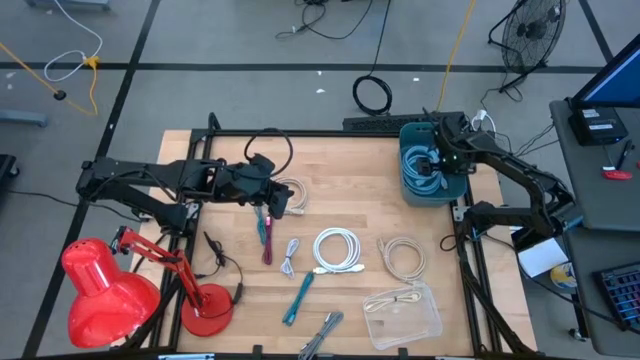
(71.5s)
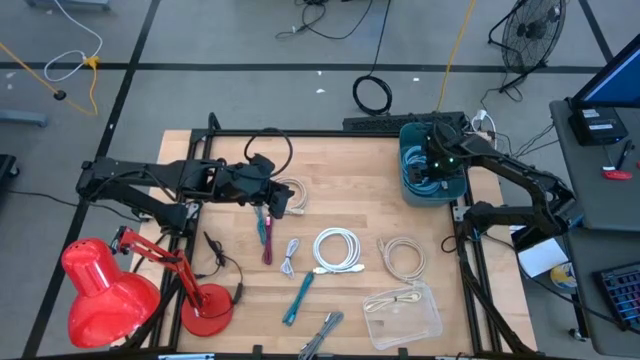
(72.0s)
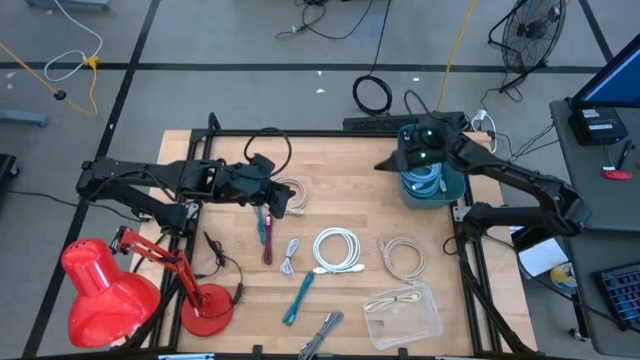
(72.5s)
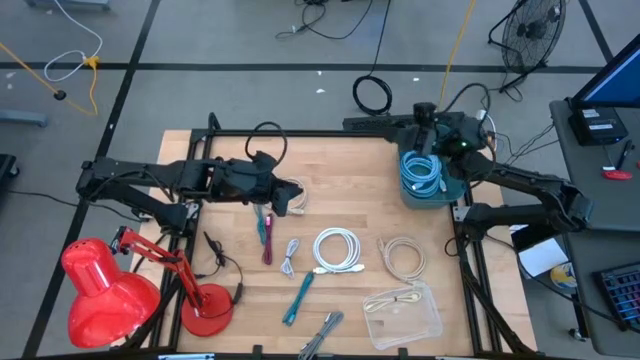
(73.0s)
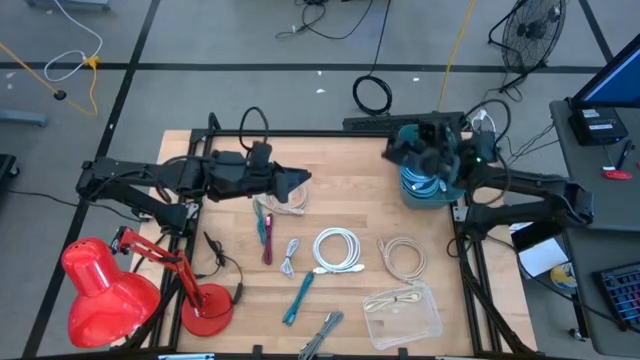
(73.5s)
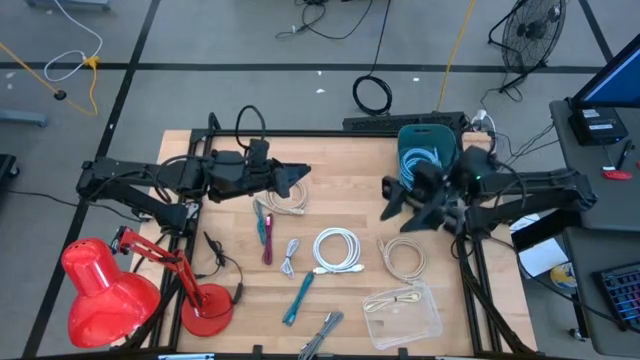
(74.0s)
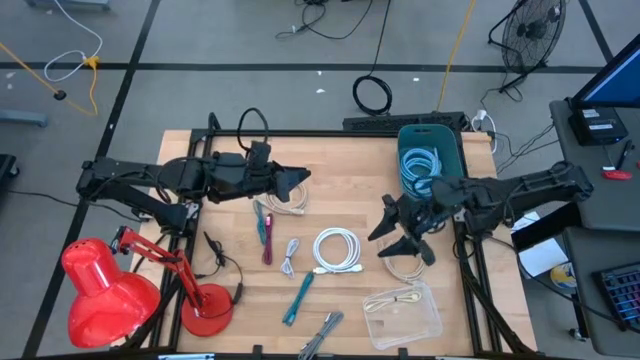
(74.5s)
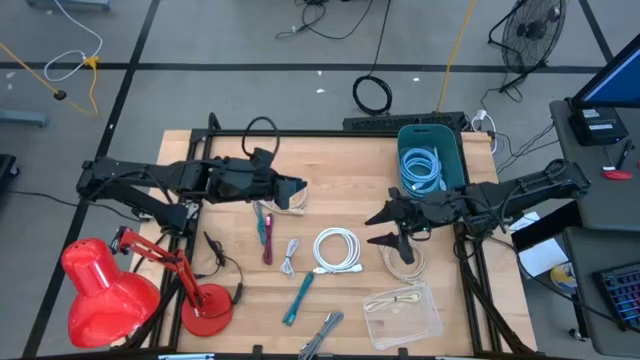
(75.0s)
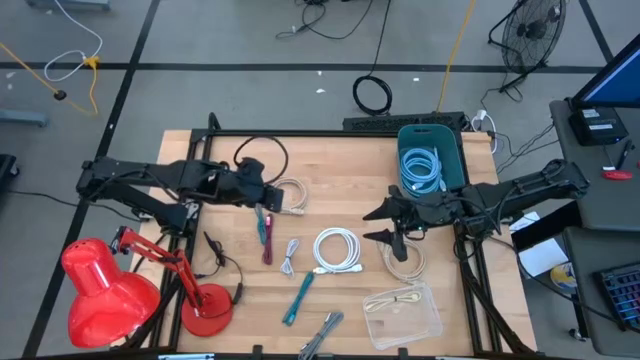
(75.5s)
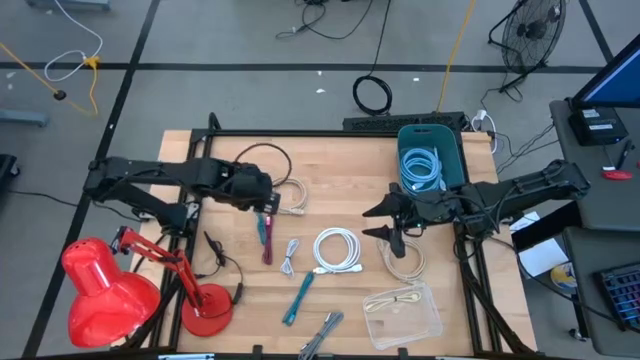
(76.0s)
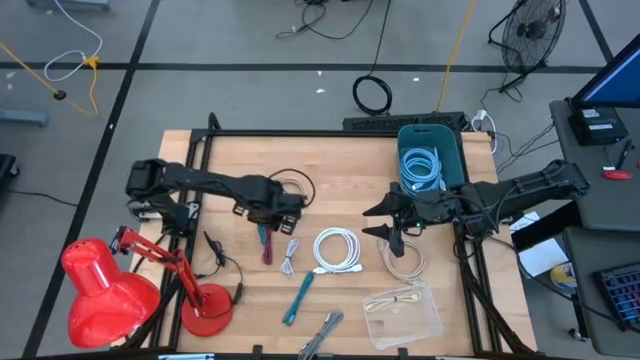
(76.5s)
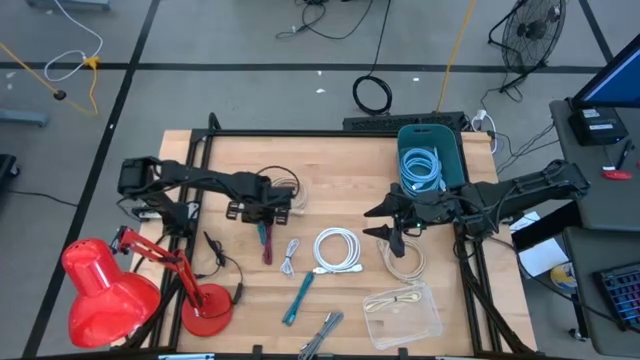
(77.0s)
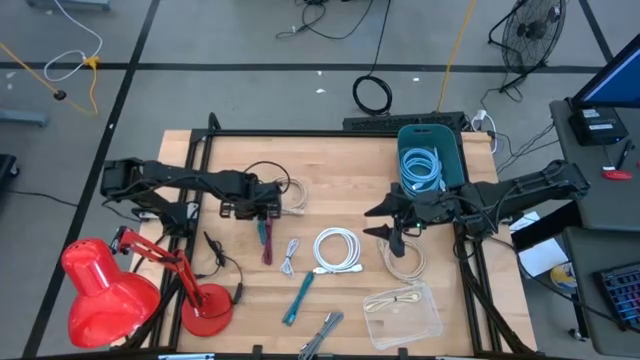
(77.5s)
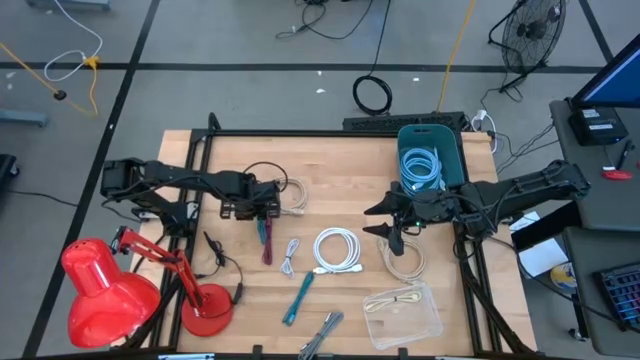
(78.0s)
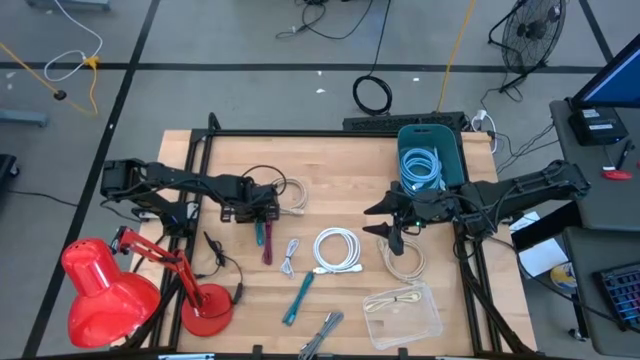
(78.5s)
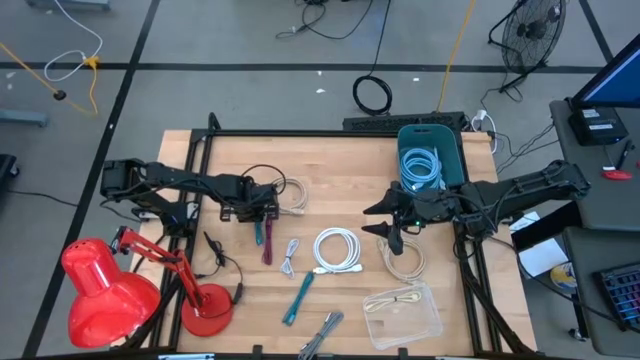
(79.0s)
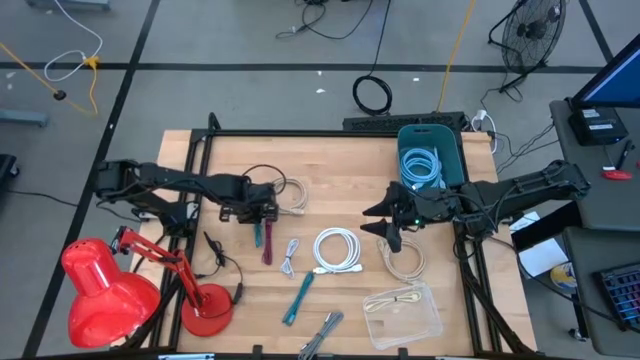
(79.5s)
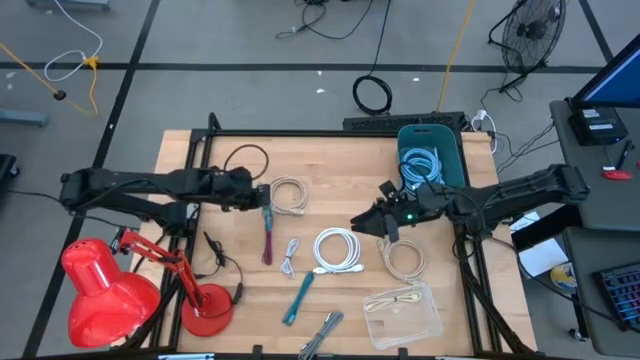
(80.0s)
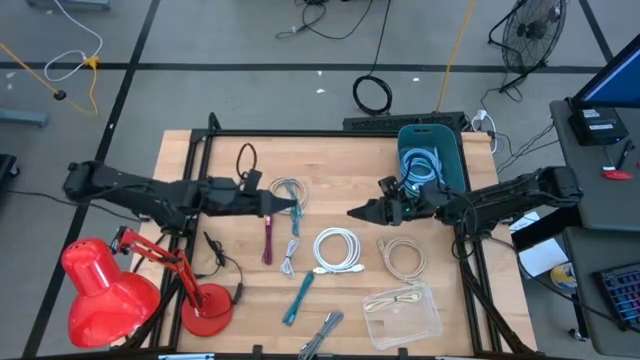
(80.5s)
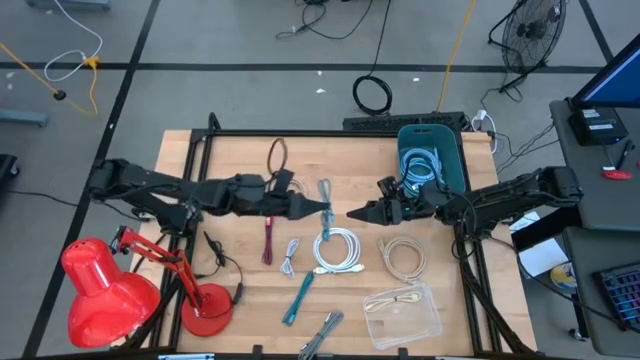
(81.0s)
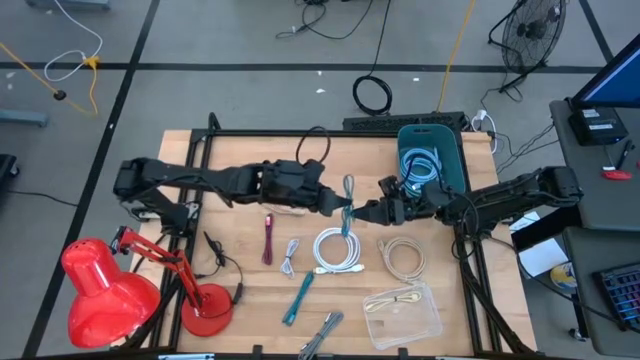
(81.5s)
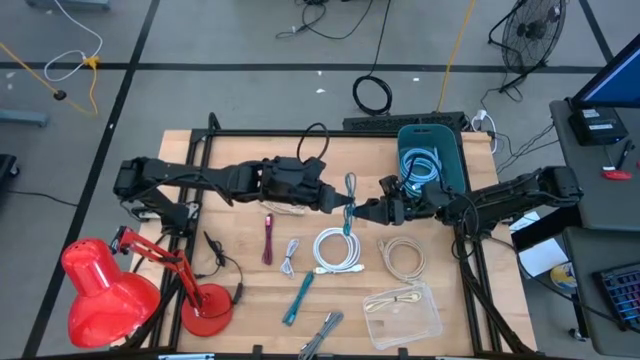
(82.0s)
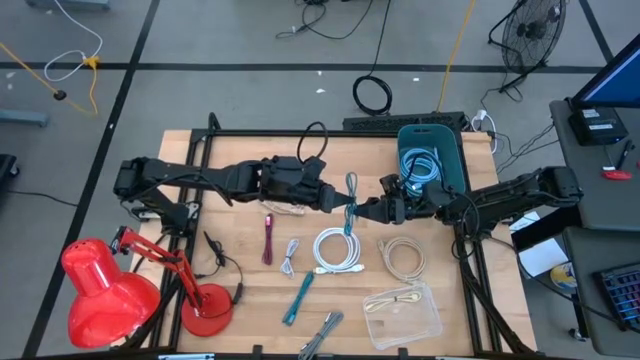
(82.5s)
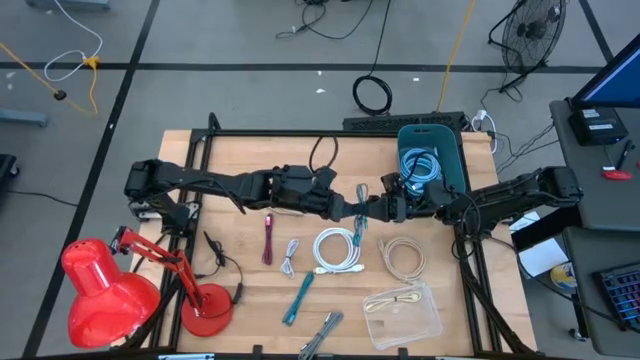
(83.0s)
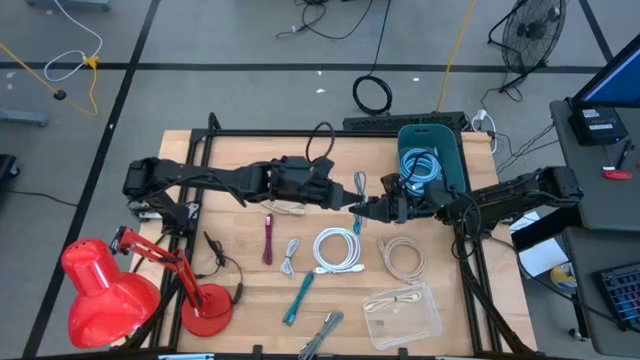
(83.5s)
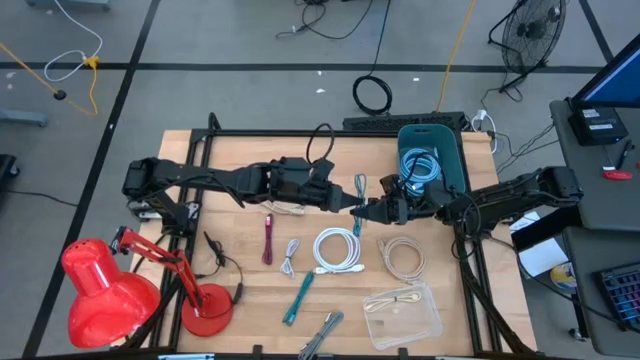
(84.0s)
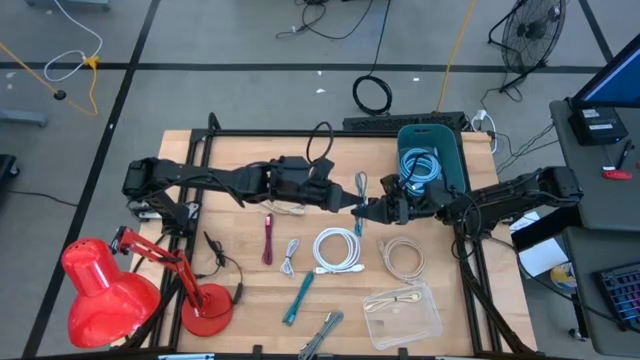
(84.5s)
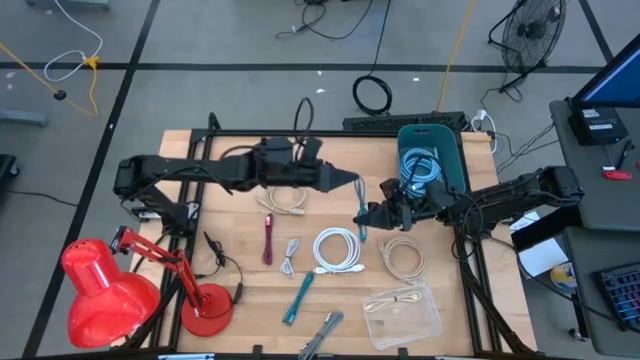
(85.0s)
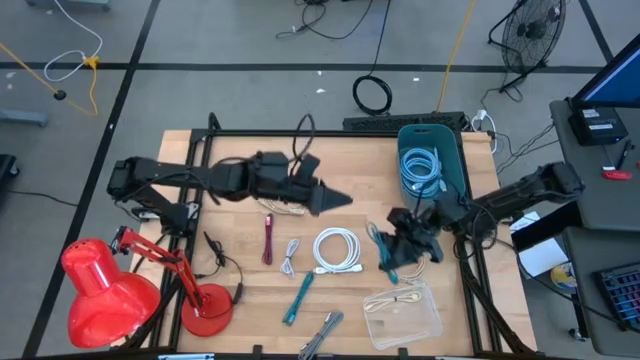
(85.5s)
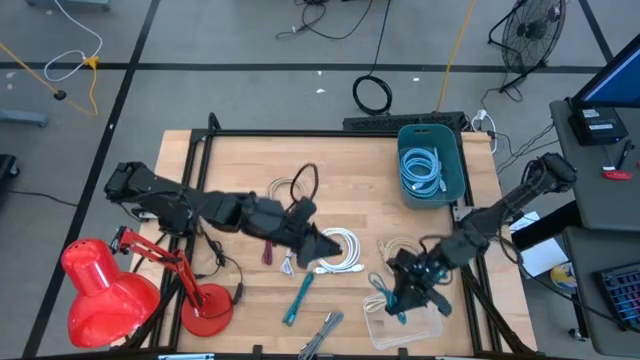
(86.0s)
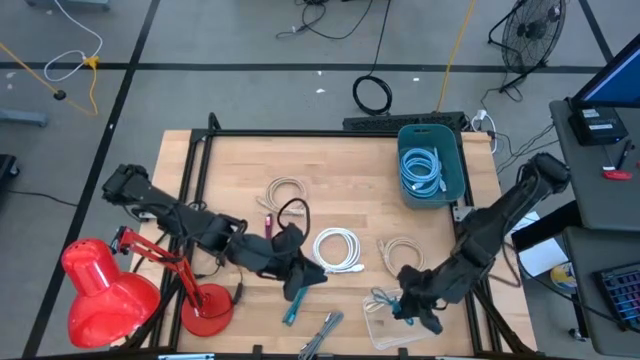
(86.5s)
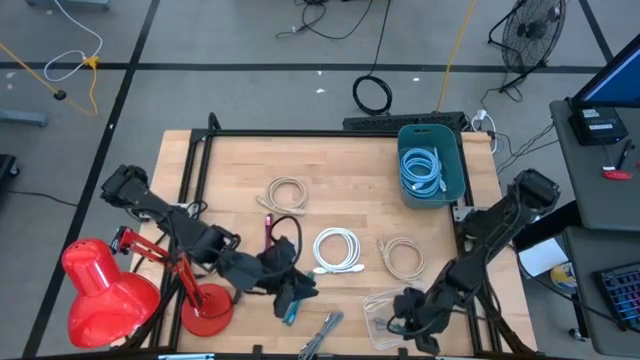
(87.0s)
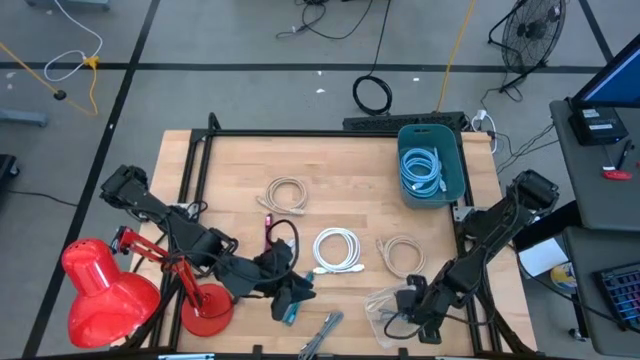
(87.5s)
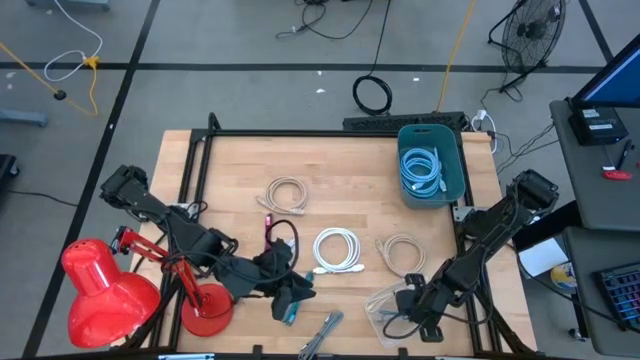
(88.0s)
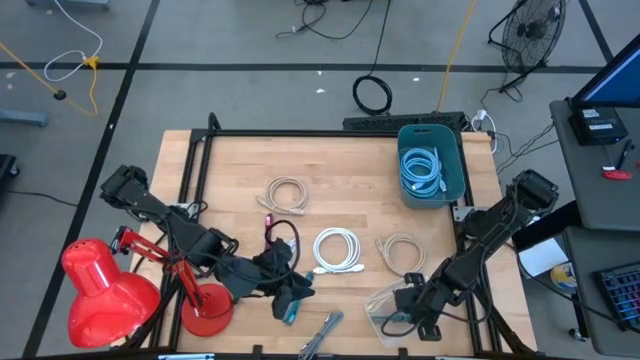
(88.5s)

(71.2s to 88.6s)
Task: Pick & Place USB Port
Put the top blue charger cable into the transparent bin

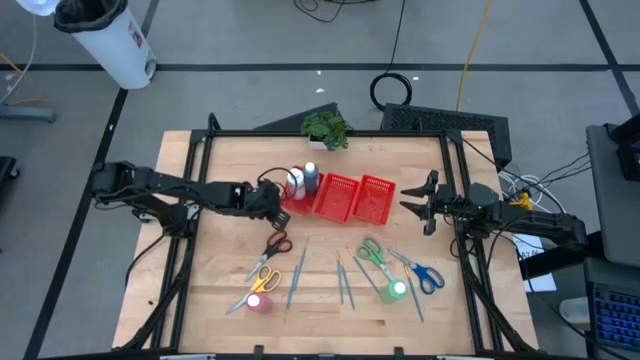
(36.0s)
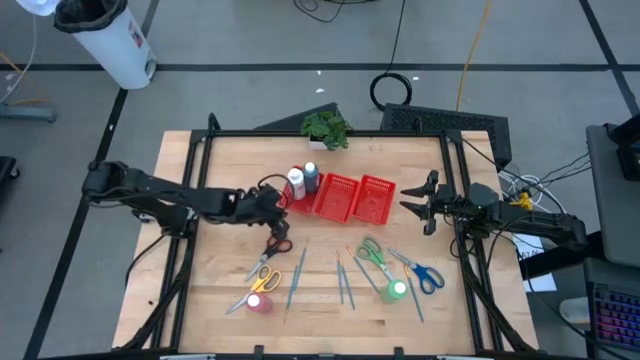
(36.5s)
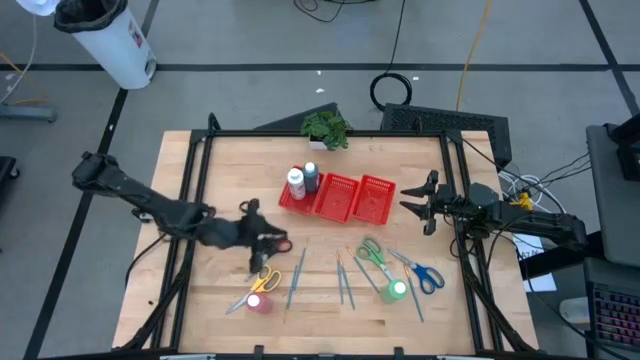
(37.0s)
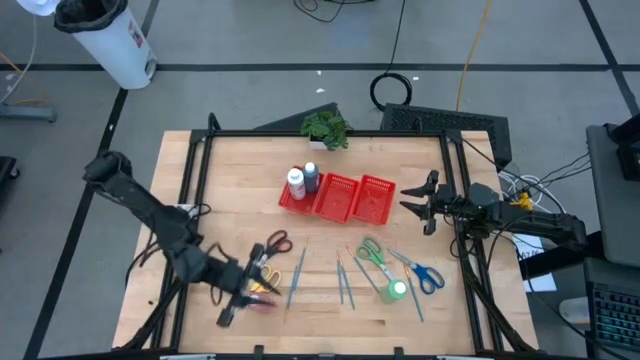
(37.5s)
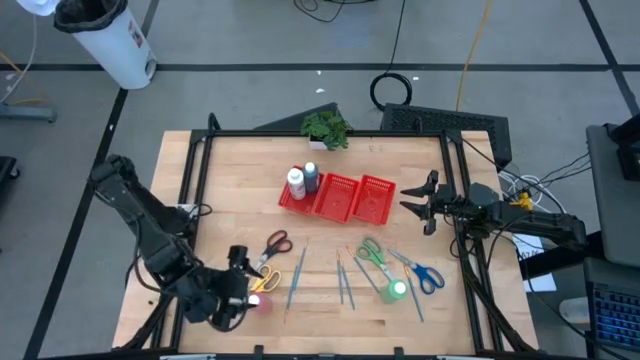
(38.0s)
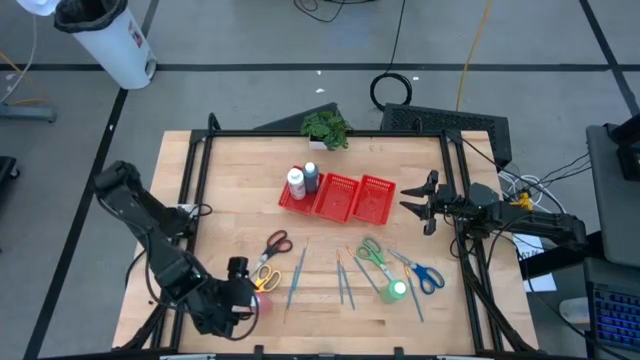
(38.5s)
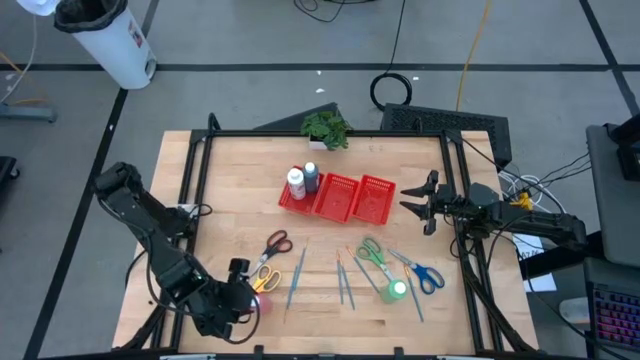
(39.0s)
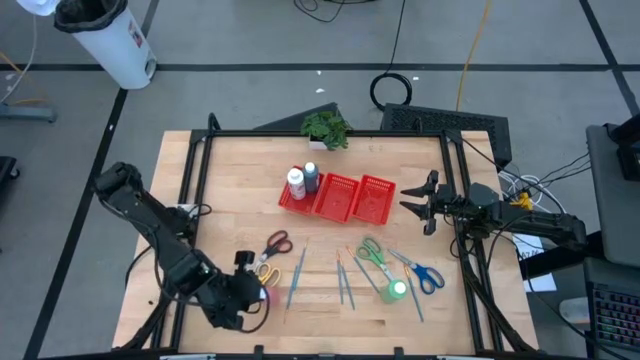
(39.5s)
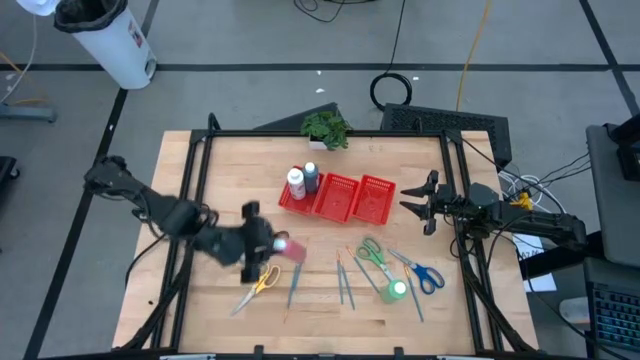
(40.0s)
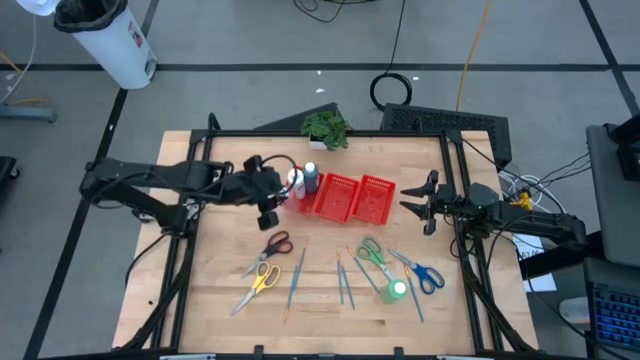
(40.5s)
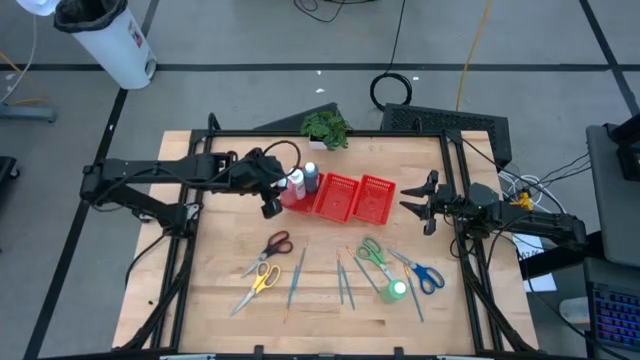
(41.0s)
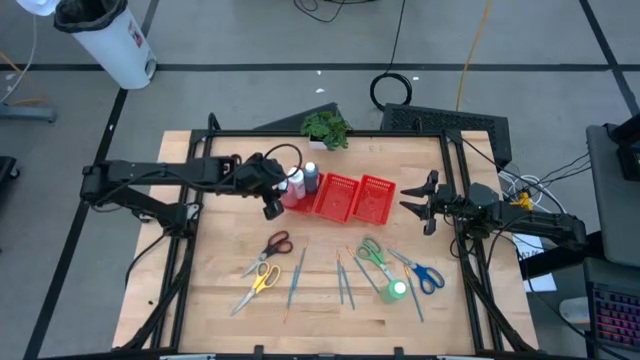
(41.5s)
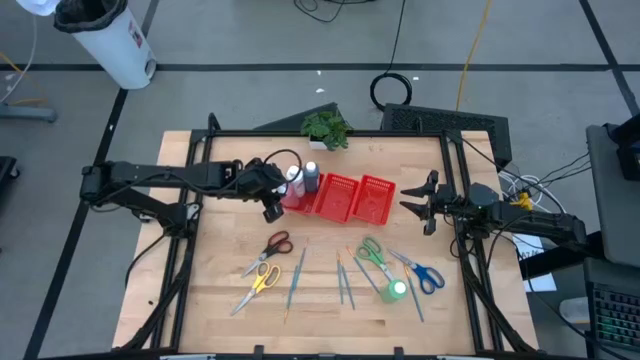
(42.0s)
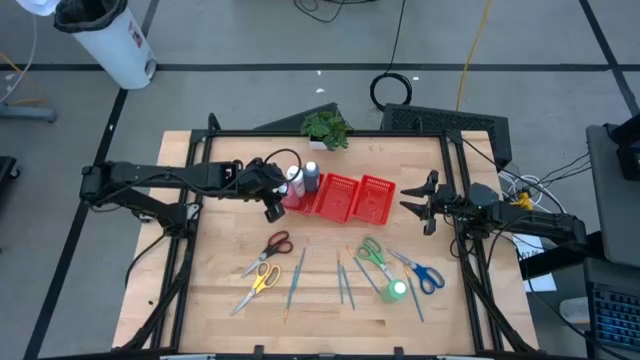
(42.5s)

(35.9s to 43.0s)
Task: Pick & Place Paint Supplies
Put the red paint bottle into the left red bin
